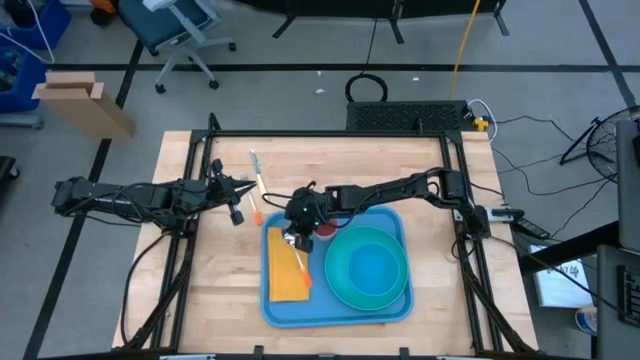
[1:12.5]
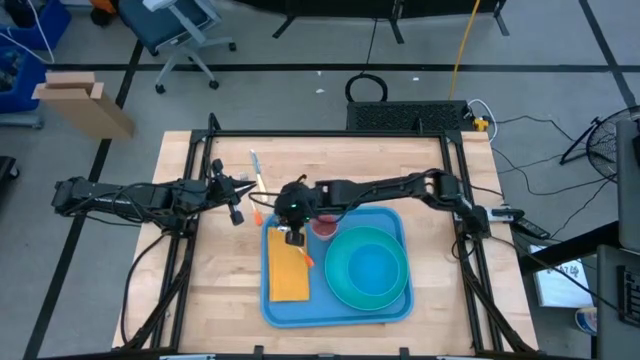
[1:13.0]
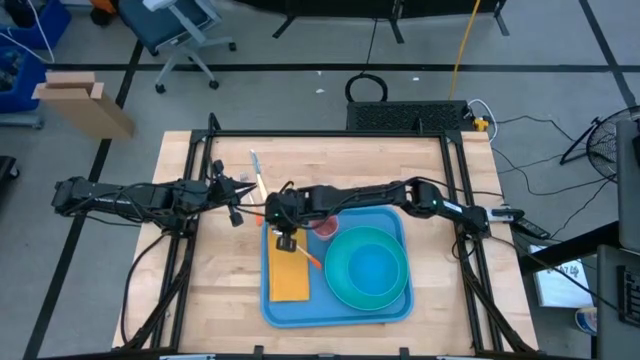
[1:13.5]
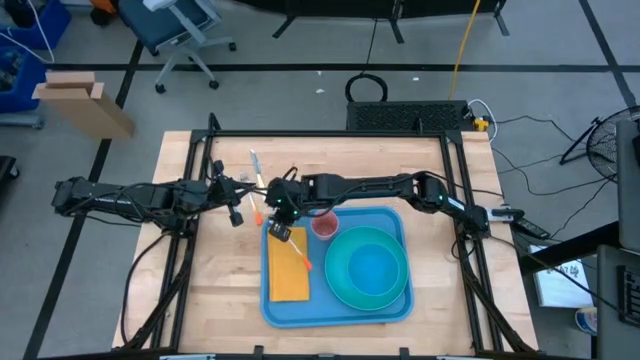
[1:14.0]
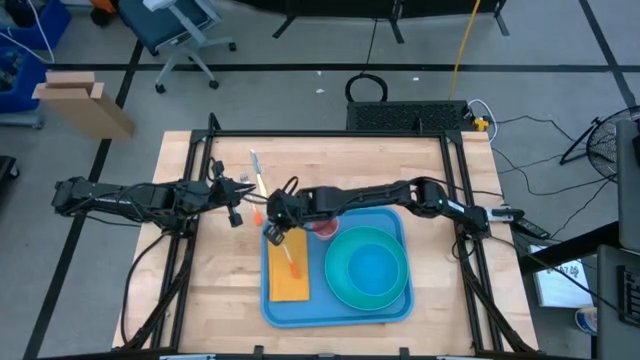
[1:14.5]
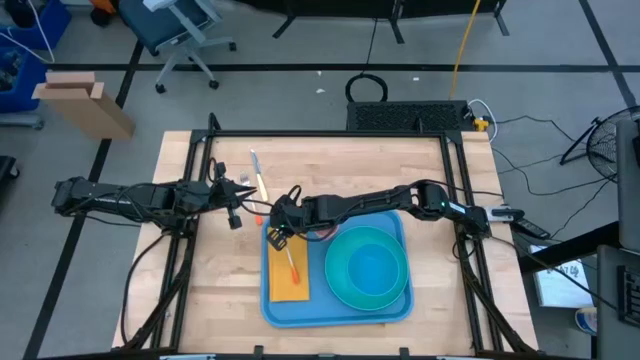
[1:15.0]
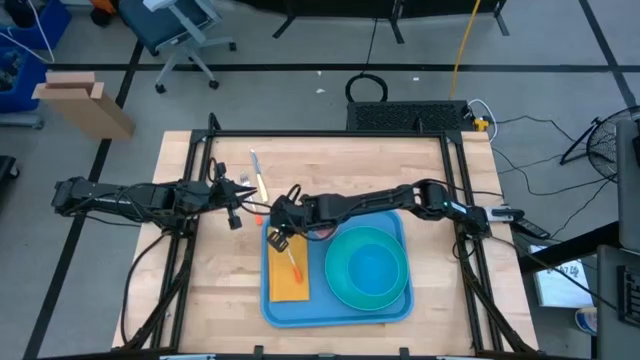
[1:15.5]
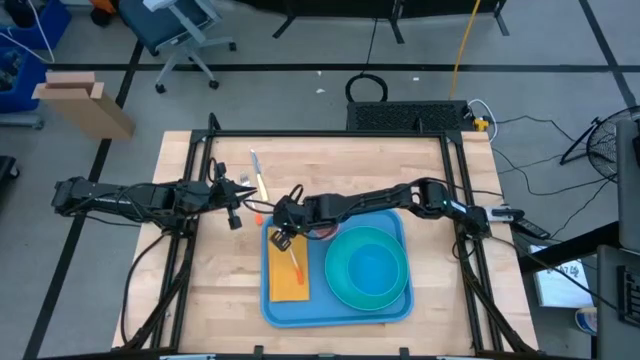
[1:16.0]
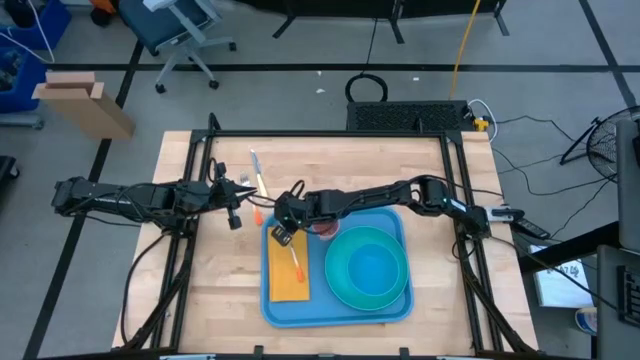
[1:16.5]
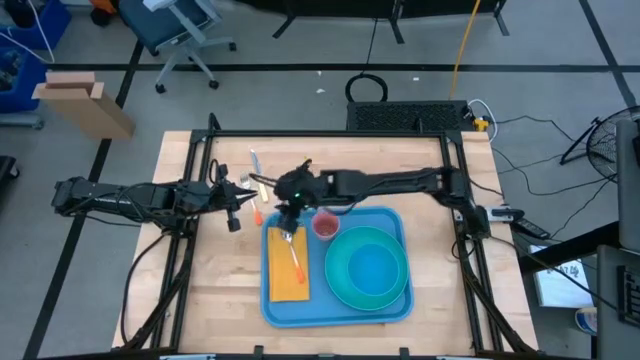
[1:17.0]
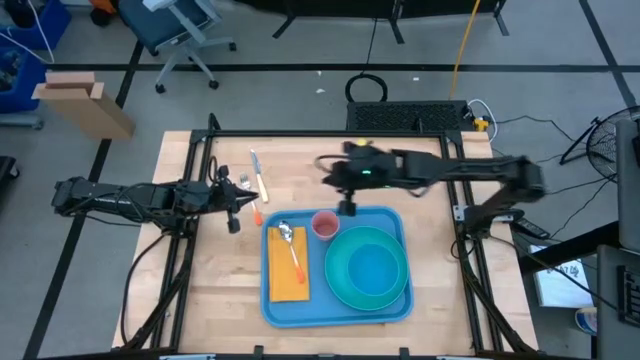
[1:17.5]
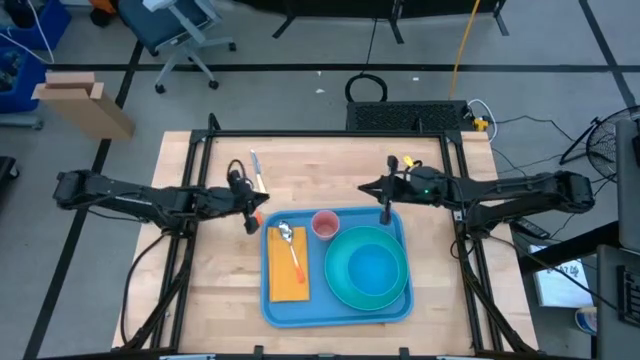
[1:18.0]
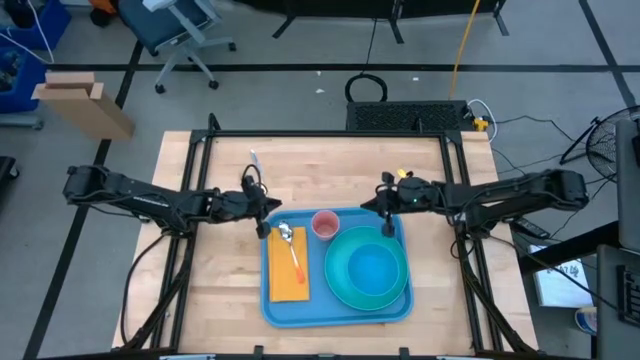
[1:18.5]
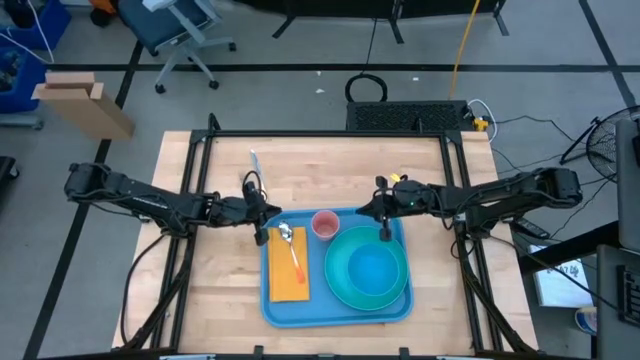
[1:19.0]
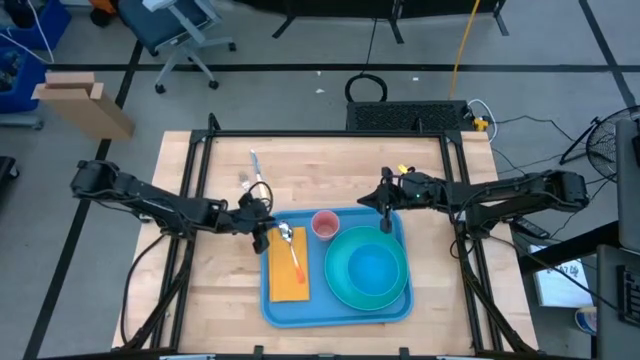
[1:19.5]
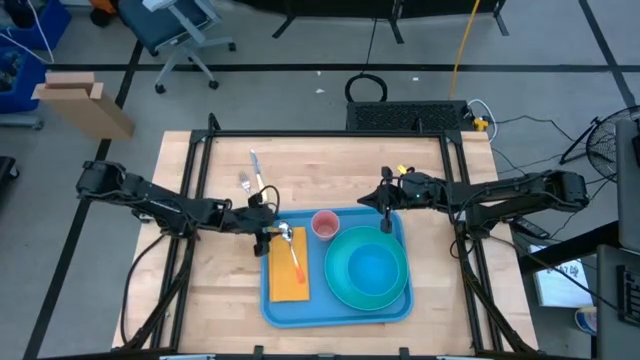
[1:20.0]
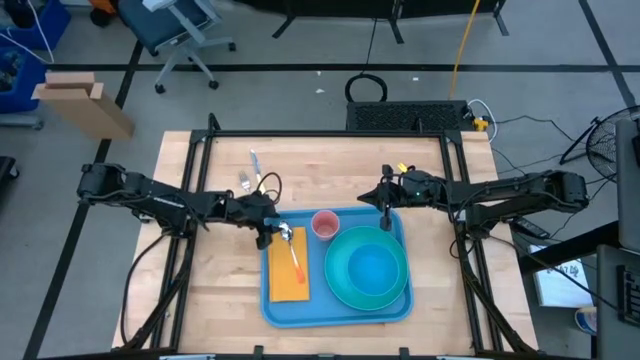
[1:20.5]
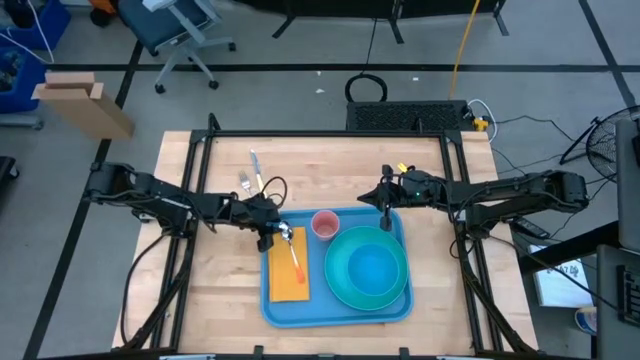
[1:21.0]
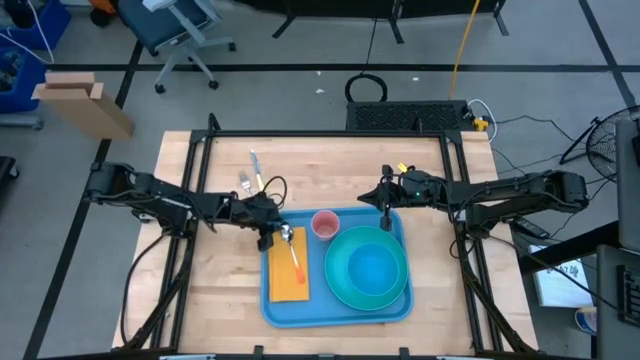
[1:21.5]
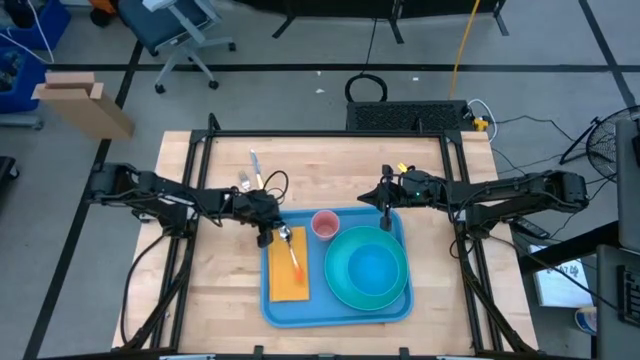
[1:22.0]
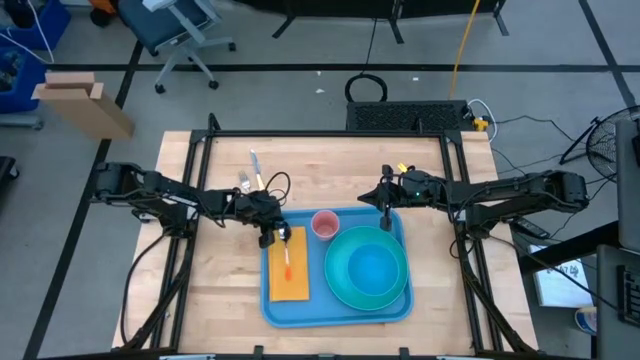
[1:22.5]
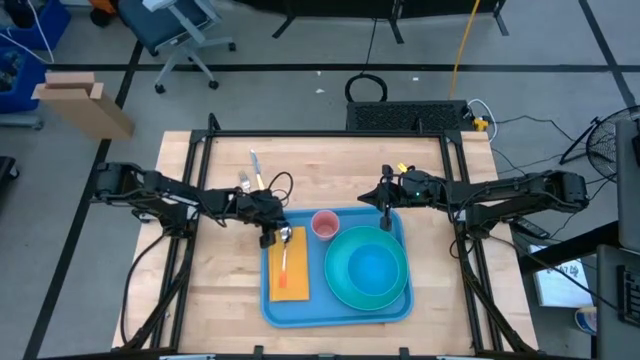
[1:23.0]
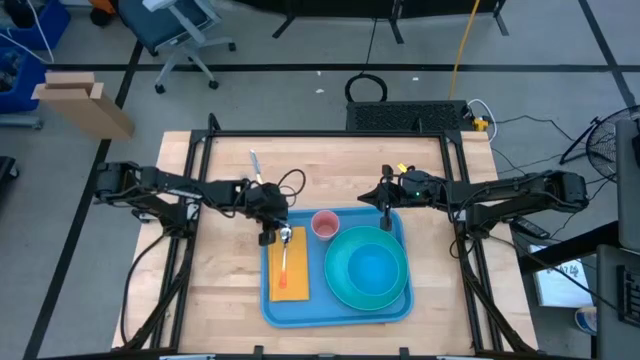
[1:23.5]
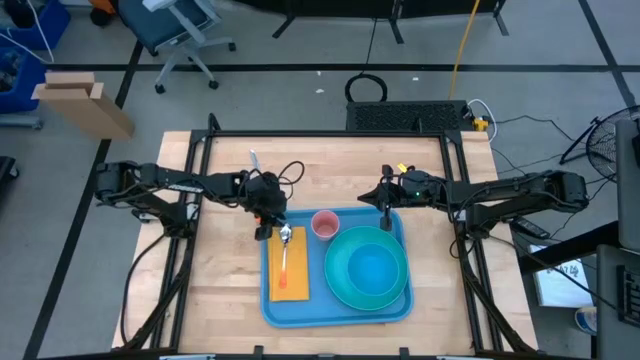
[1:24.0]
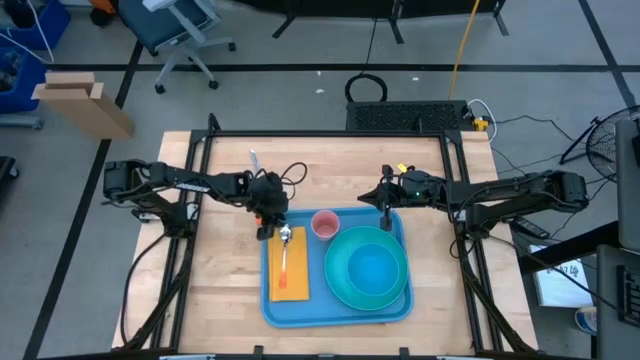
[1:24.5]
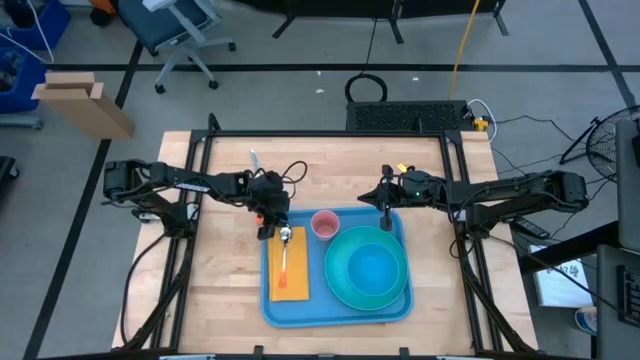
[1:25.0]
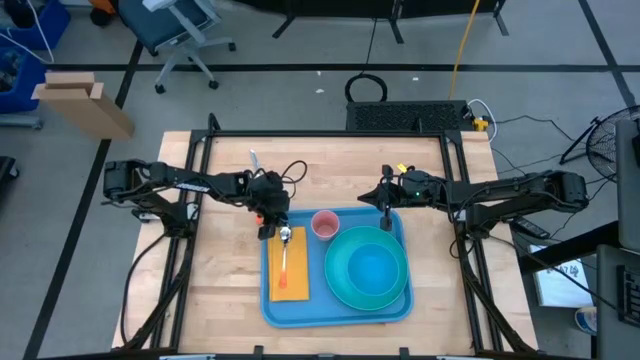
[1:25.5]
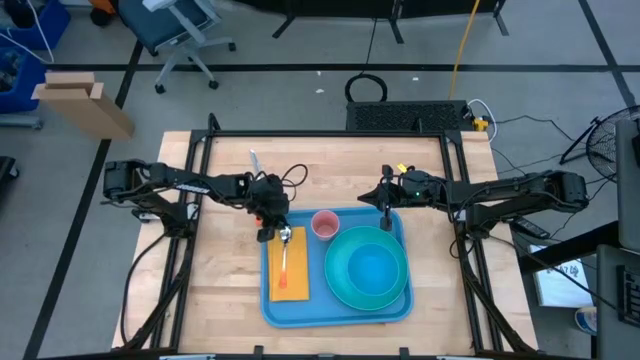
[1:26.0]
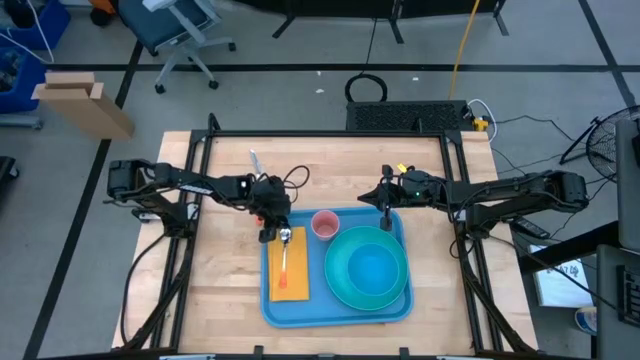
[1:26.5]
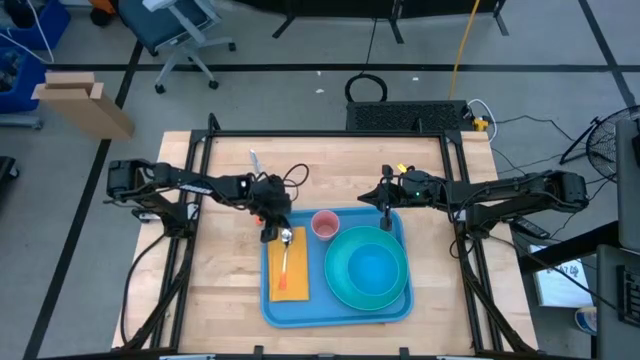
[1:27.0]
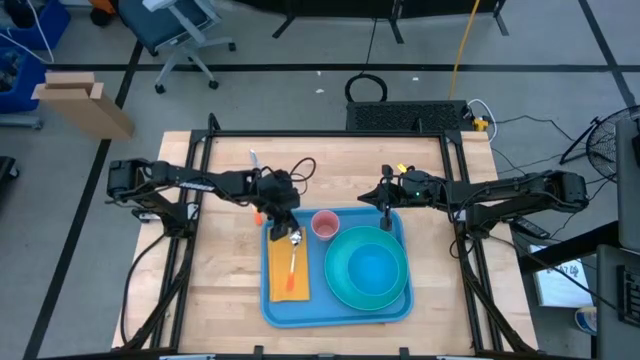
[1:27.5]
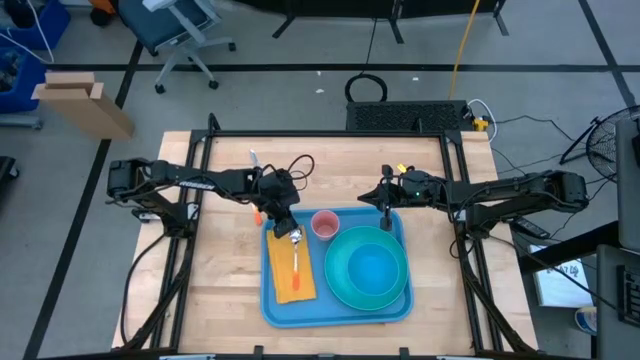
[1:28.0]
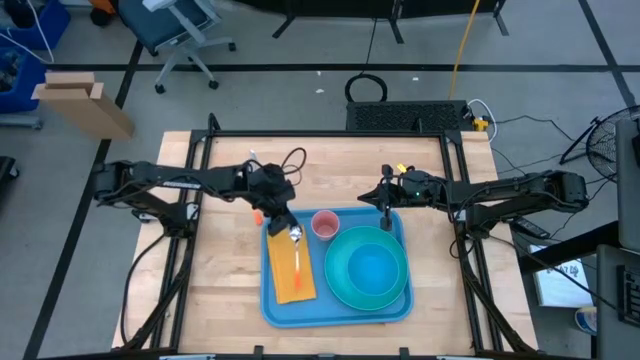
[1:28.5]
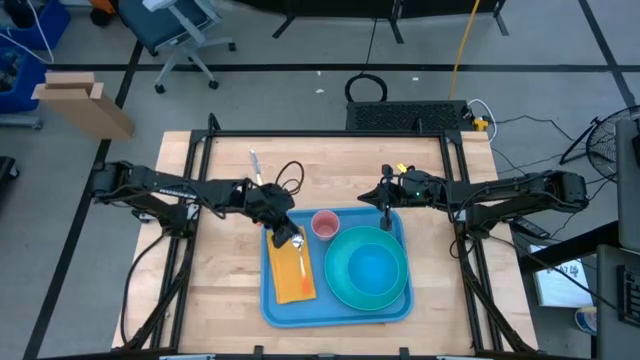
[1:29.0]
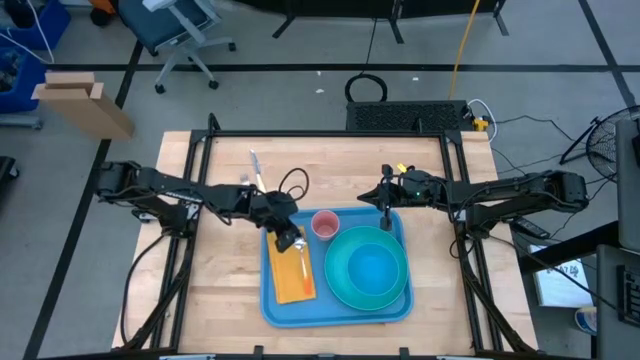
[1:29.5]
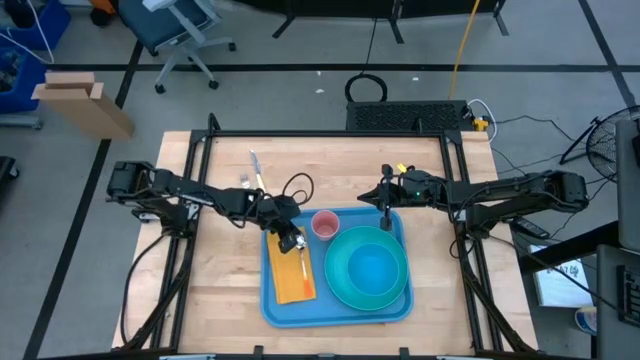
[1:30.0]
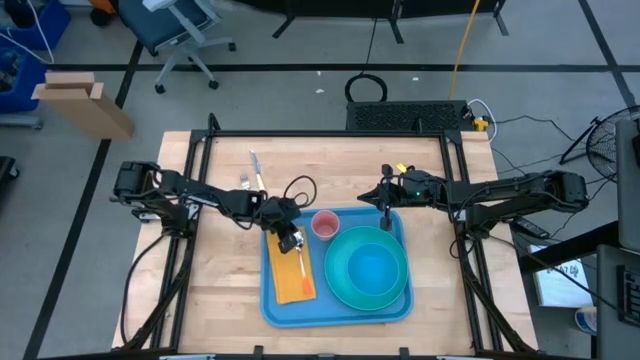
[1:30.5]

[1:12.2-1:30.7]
Task: Set up tray
Put the orange spoon on the yellow napkin

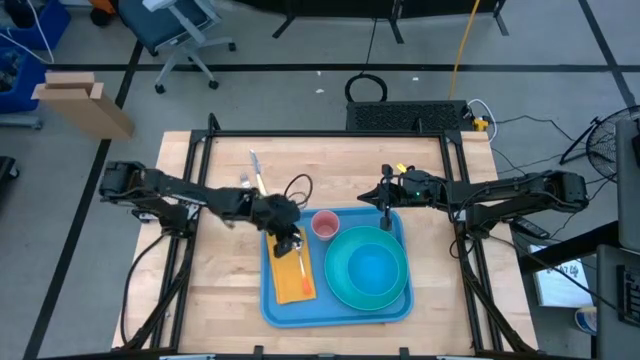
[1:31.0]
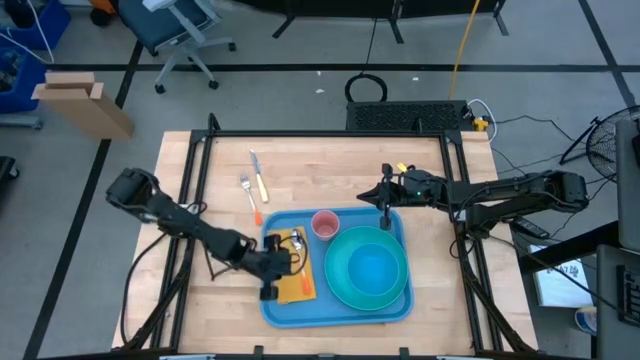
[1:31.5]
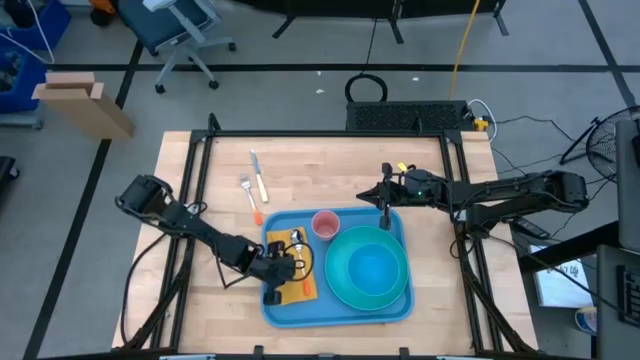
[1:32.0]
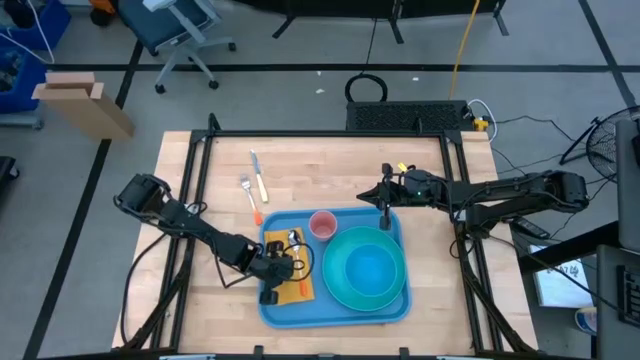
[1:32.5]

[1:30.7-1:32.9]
Adjust the yellow napkin on the blue serving tray

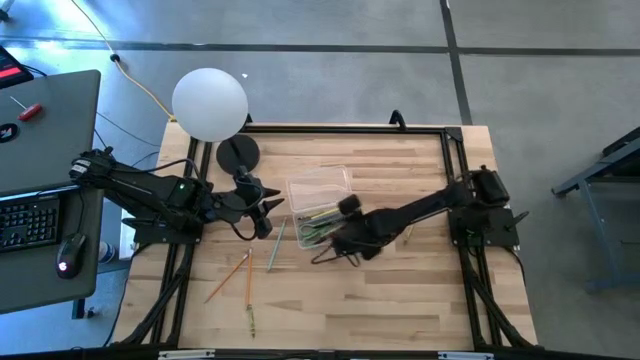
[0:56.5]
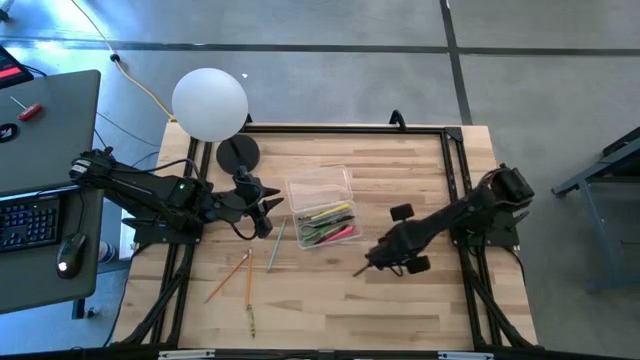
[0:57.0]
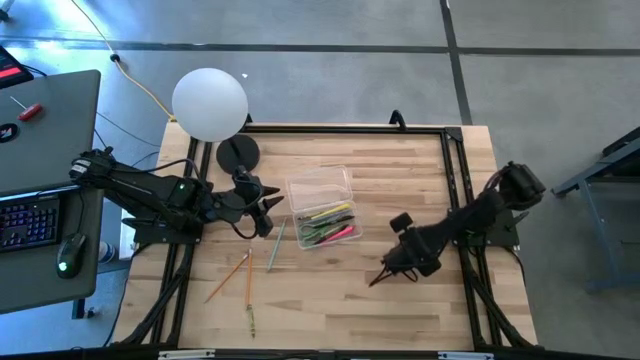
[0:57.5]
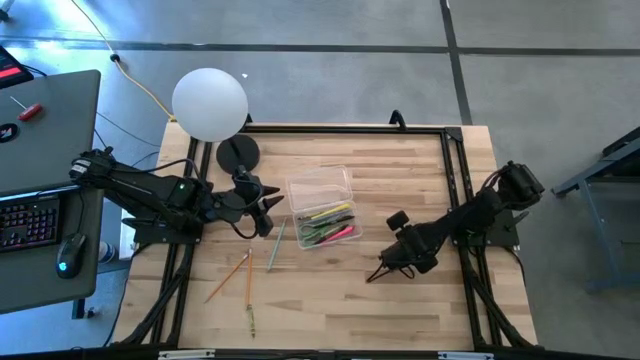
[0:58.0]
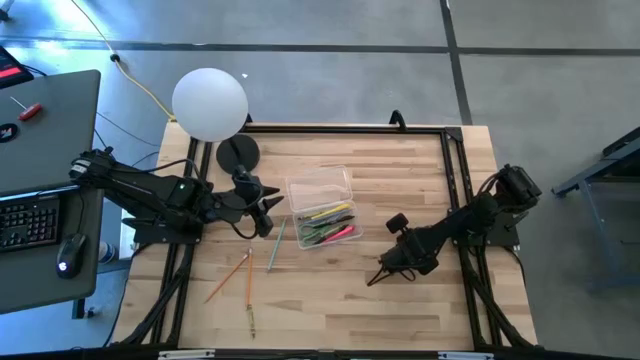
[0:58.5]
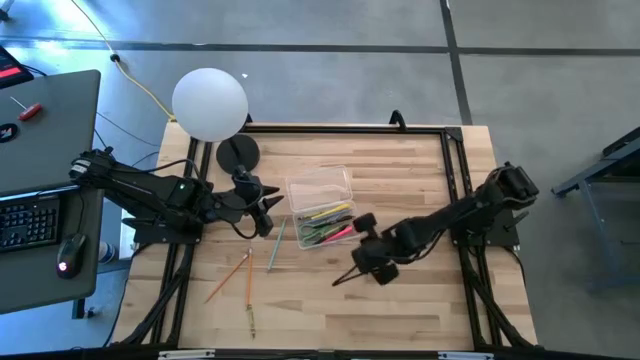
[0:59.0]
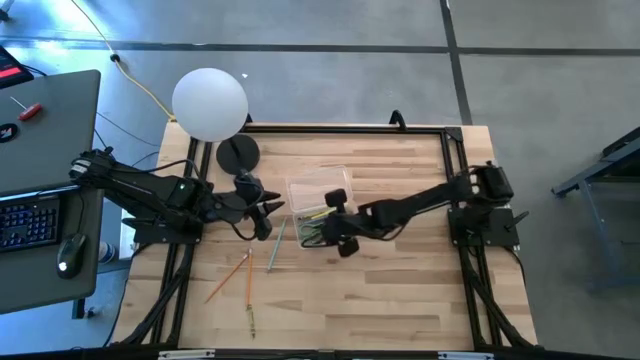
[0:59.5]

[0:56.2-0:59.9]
Task: Pick & place school supplies into a supply box
Put the green crayon into the transparent supply box
